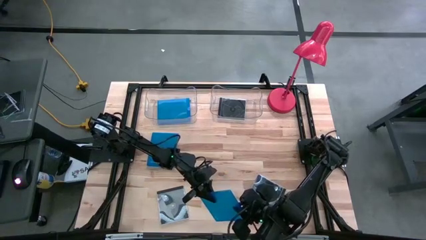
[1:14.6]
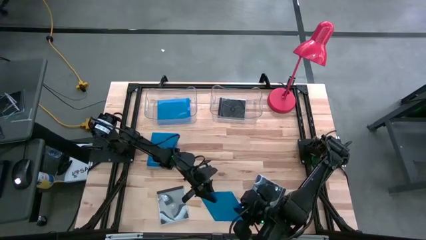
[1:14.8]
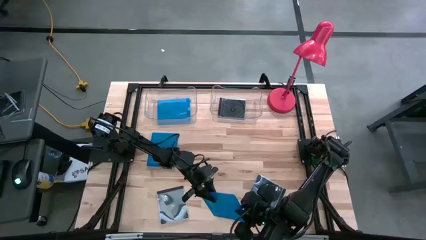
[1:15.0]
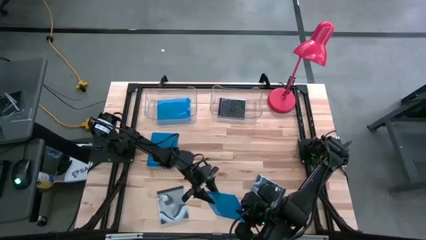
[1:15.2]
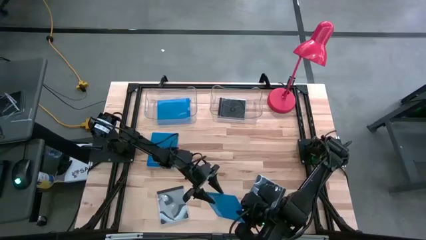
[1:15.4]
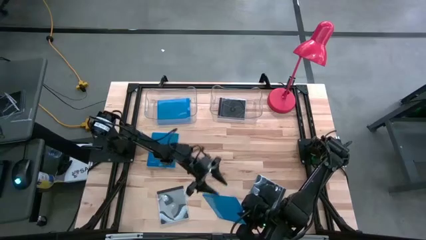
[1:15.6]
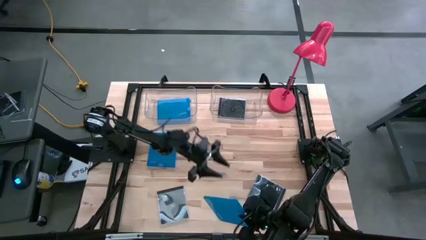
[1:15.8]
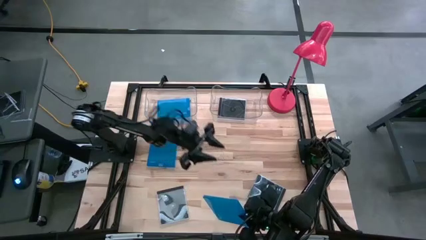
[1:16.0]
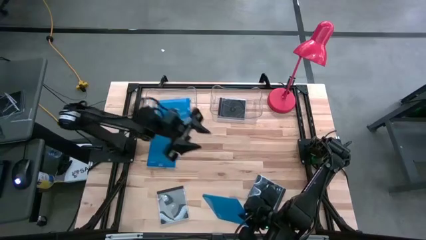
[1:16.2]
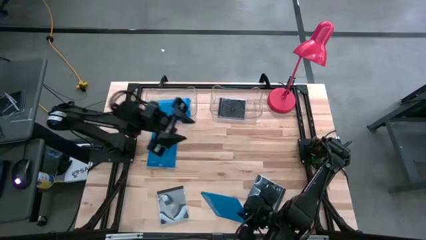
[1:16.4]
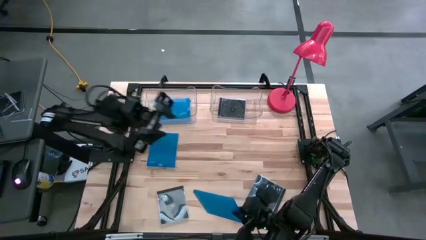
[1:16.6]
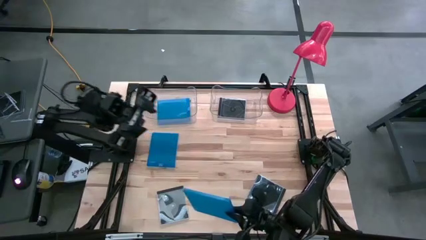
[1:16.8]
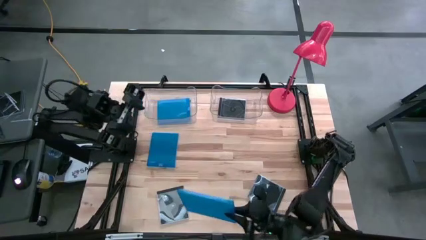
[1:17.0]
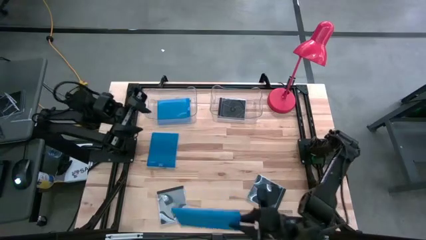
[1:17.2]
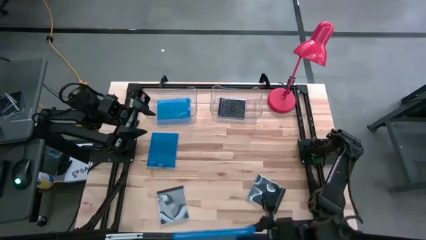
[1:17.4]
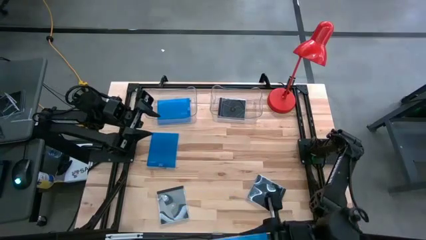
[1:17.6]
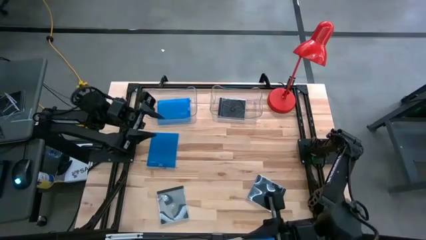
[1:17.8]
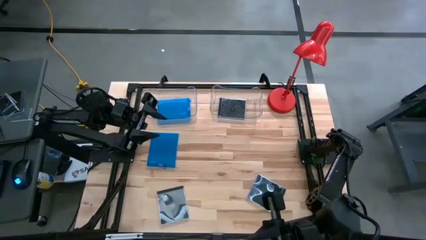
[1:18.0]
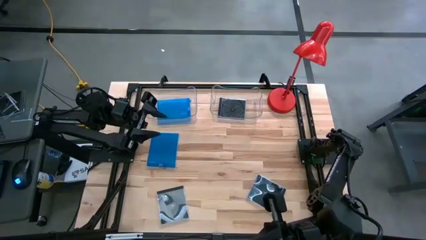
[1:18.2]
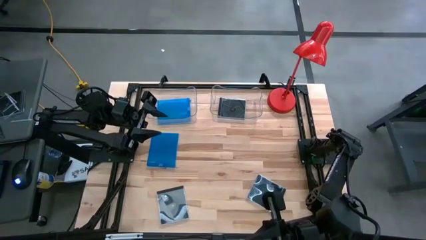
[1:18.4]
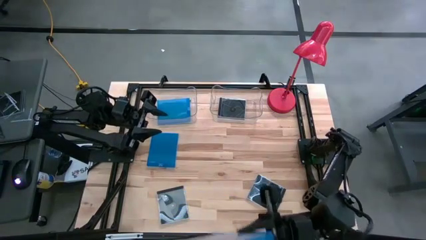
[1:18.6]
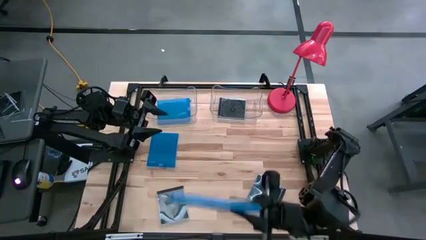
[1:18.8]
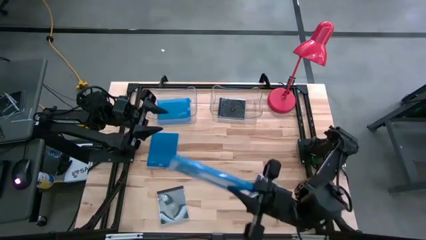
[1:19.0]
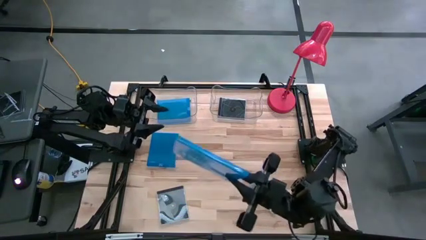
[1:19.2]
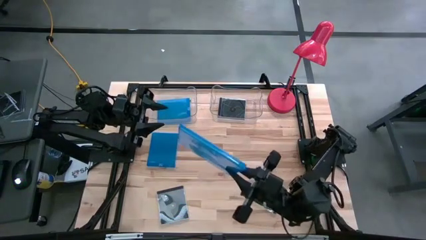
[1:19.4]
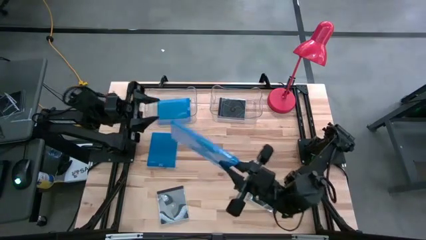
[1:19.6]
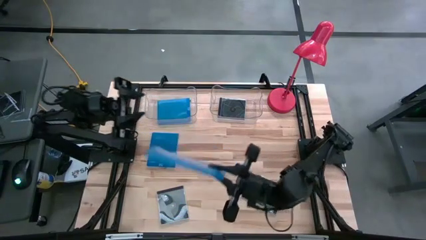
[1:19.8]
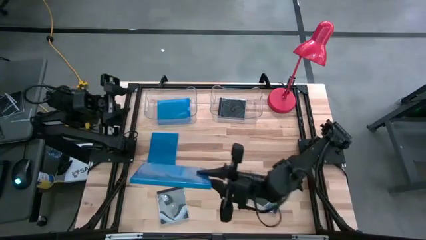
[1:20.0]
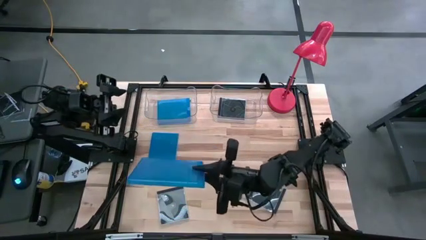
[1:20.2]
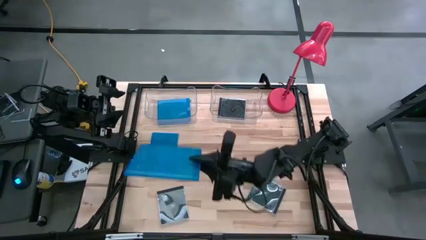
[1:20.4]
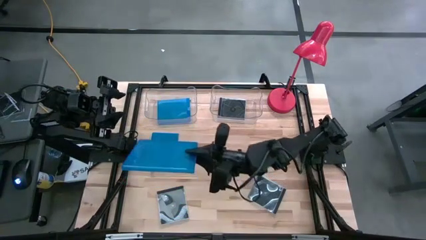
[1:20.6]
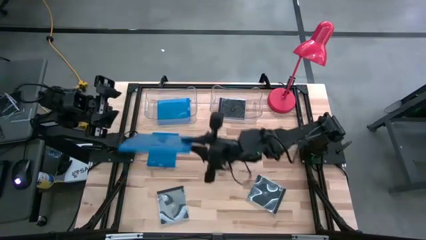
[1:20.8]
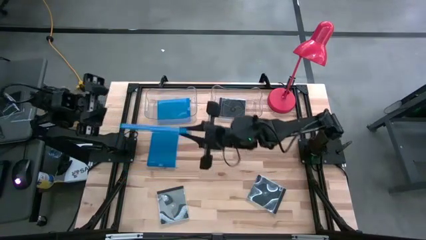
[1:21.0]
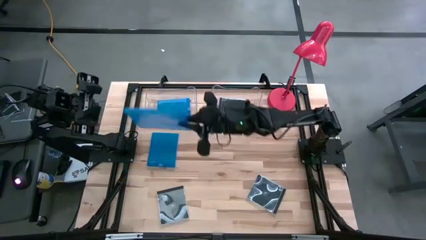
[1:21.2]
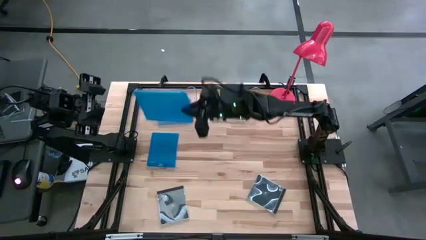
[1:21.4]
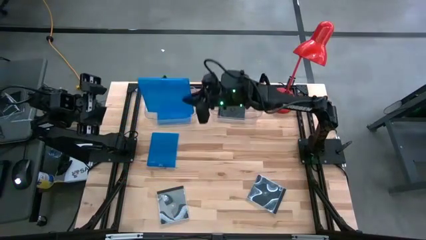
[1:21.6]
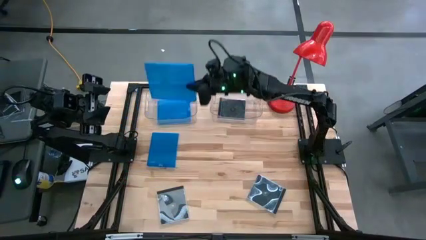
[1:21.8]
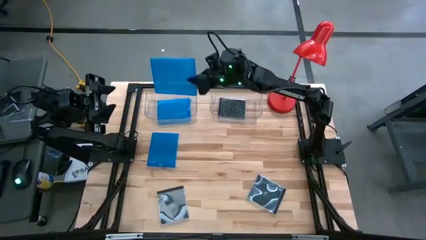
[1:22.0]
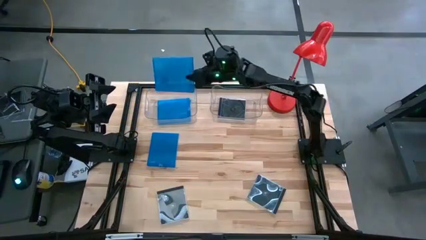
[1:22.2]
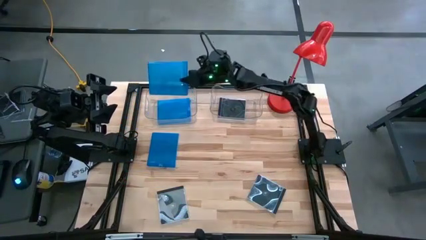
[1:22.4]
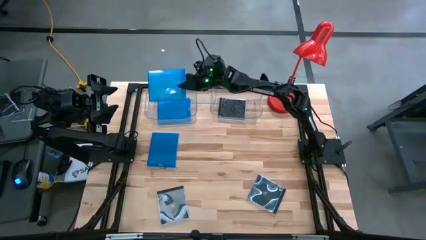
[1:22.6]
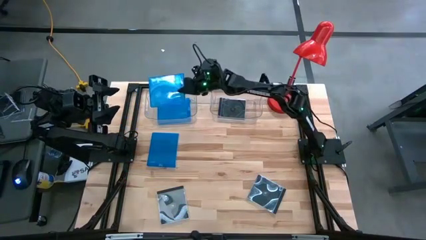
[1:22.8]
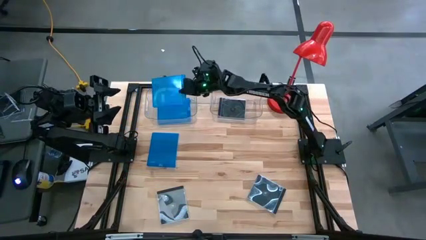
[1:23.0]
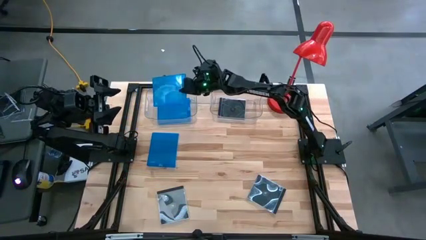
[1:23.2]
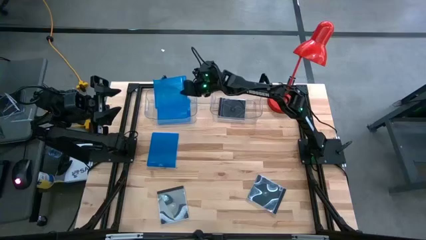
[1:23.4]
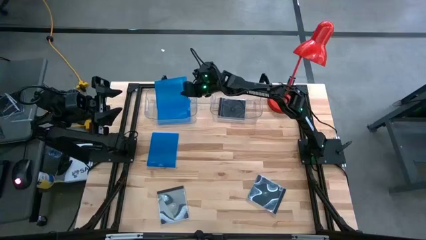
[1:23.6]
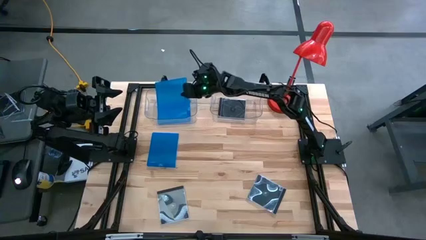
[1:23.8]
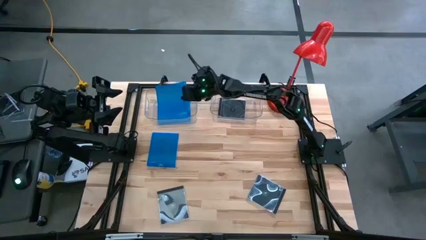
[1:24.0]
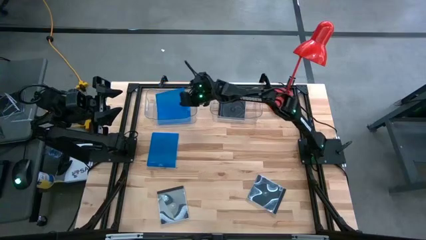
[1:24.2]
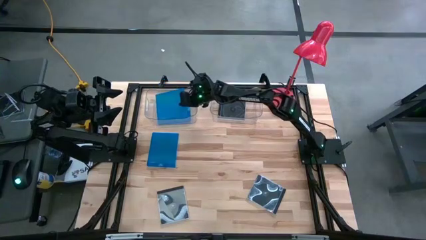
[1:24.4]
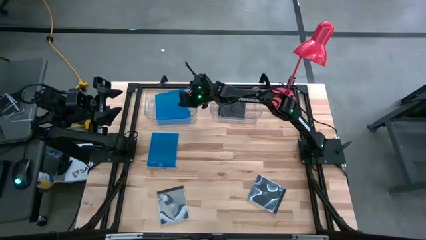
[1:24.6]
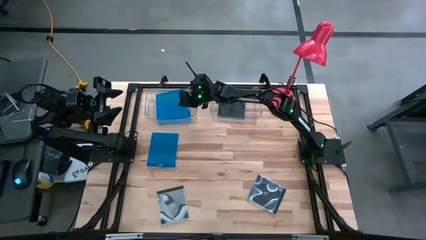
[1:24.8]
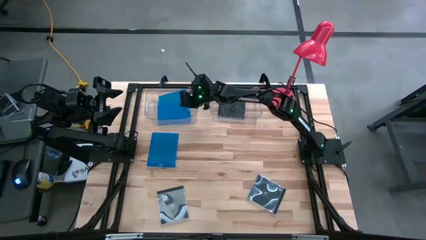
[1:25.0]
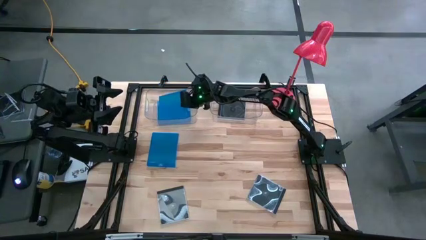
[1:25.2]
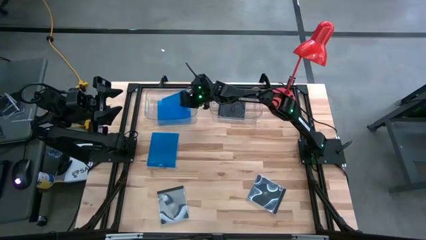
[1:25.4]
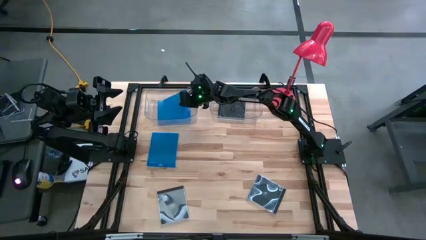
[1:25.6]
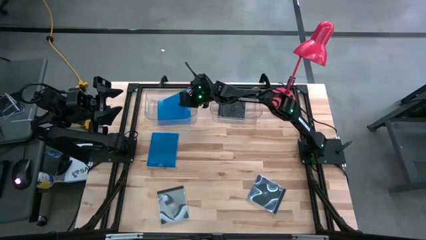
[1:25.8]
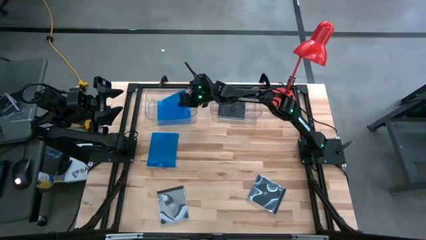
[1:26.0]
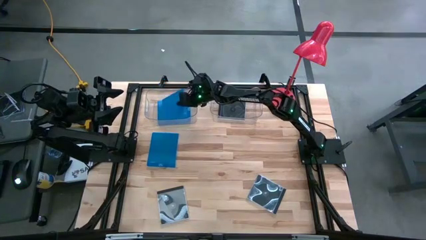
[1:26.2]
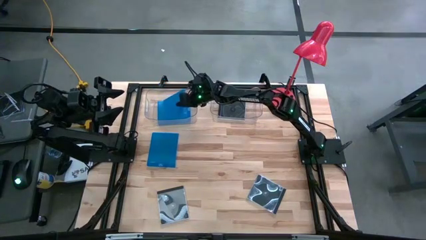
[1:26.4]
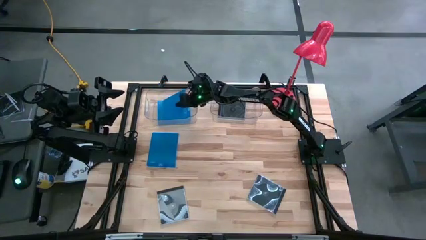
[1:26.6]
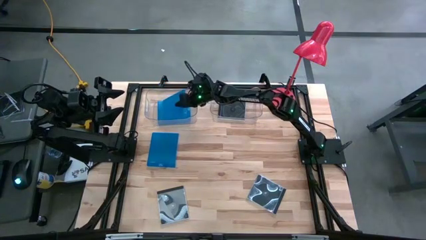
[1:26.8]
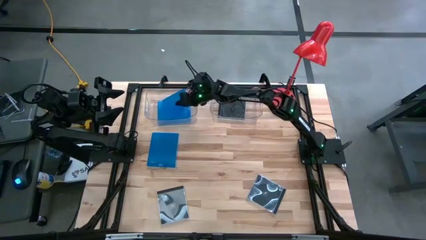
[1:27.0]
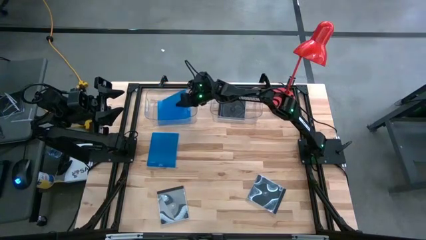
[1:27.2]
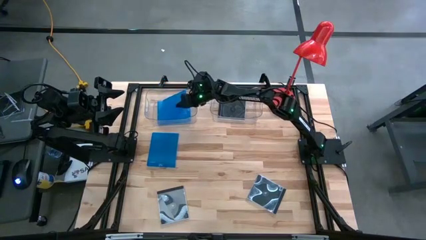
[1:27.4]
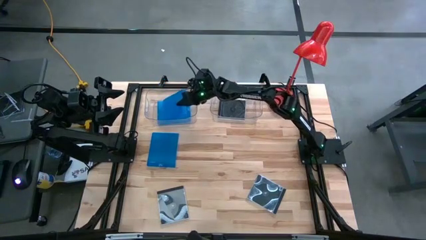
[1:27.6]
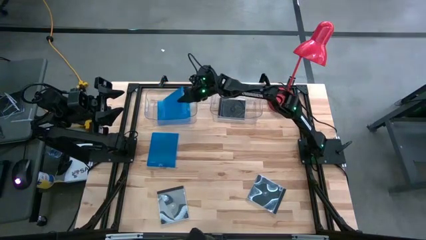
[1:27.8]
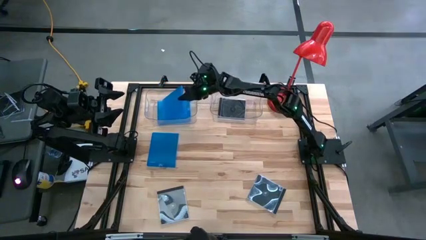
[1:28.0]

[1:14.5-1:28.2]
Task: Pick & place jewel cases by type
Put the bottom blue CD case into the left transparent bin

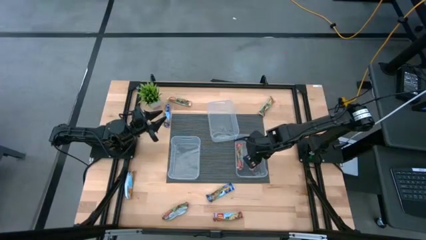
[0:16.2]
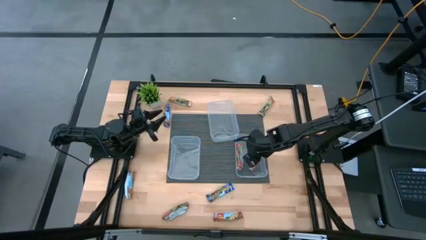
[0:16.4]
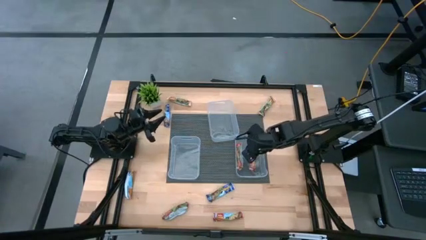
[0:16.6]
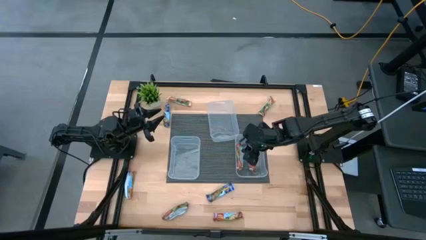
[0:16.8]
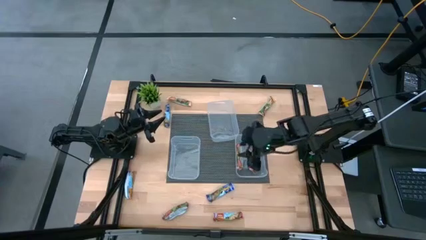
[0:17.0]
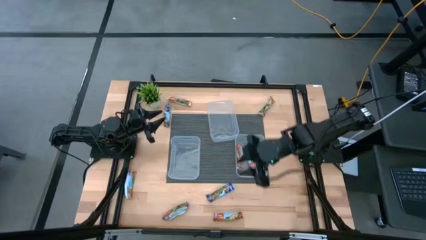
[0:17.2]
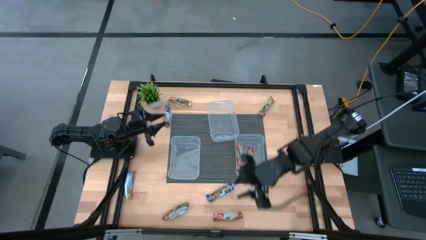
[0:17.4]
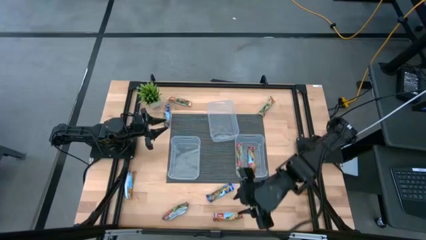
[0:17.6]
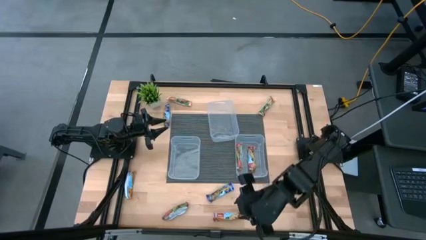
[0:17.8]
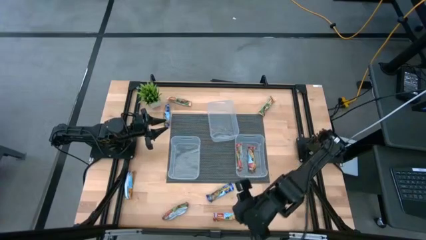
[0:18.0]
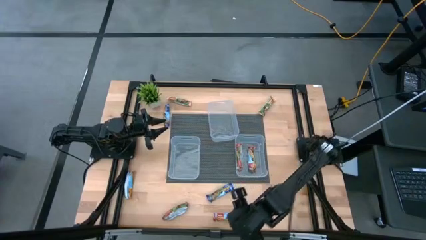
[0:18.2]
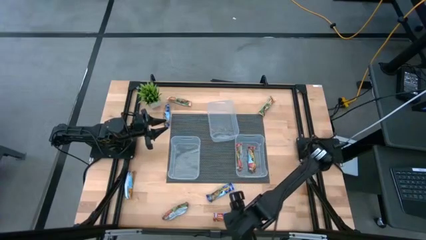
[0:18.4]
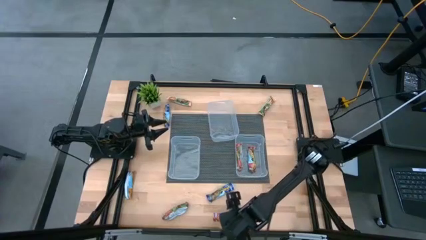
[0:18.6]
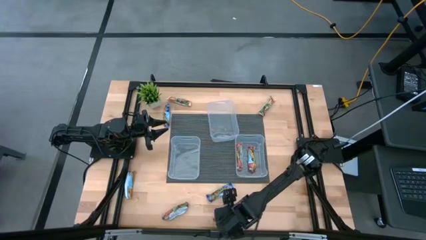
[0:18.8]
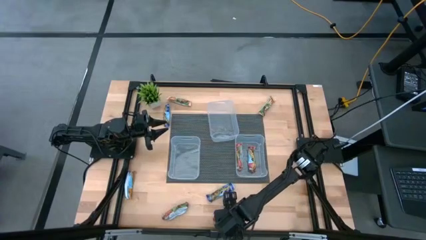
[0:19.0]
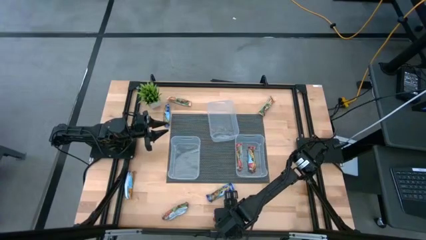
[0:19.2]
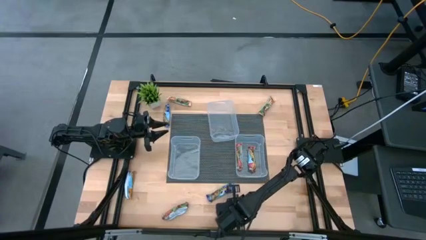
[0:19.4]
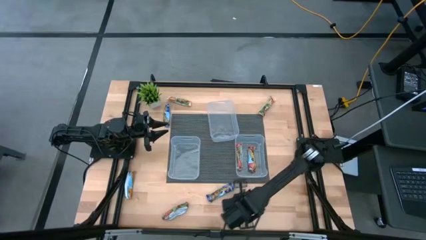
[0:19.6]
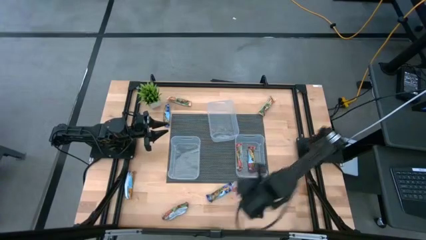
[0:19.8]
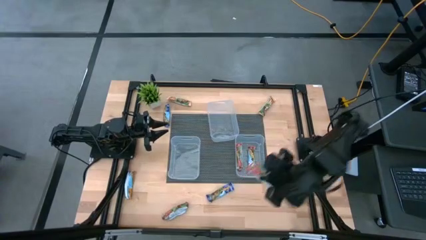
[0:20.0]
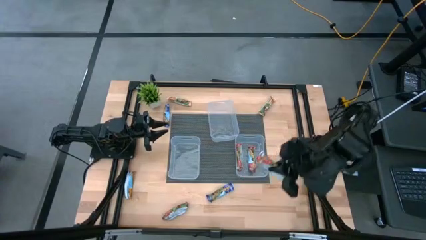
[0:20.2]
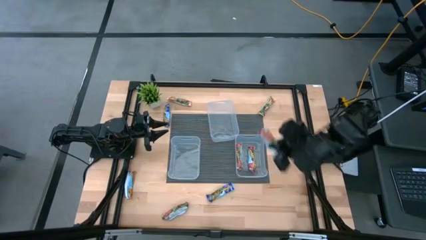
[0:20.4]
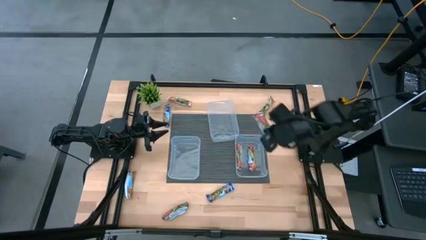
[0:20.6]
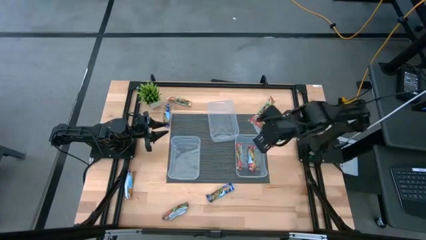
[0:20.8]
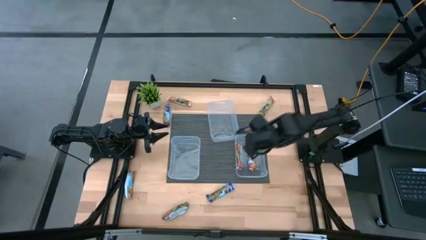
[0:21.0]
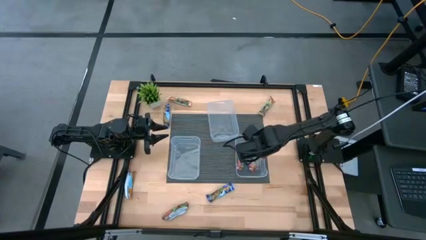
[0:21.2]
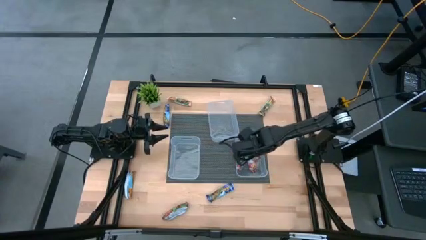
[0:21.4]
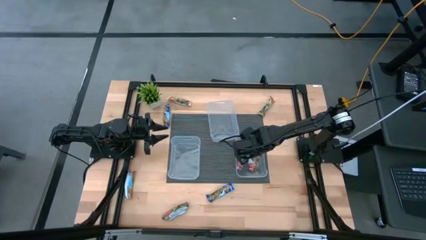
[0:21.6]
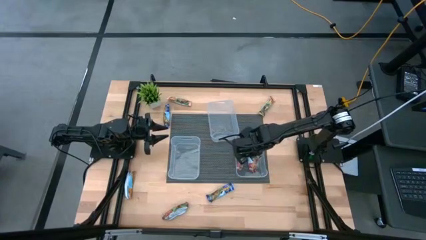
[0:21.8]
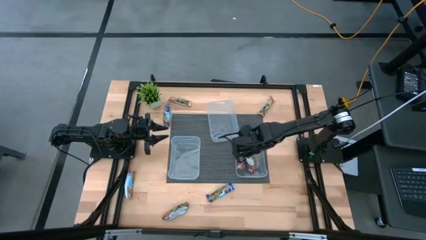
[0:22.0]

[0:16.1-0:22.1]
Task: Pick and place Granola Bars by type
Put the red granola bar into the bottom right transparent bin
